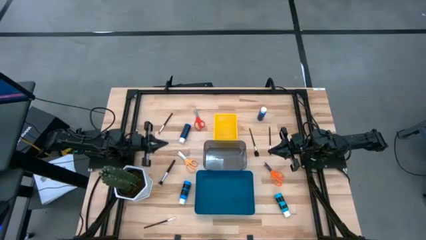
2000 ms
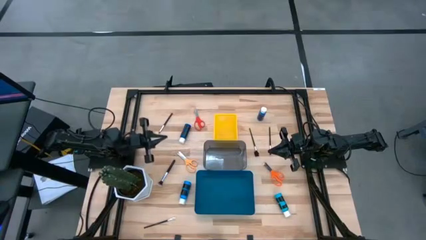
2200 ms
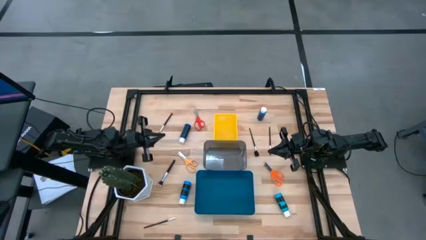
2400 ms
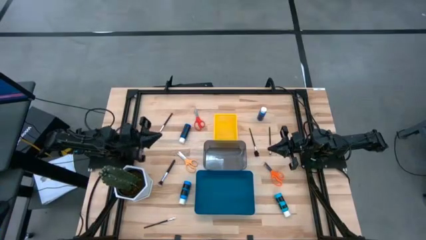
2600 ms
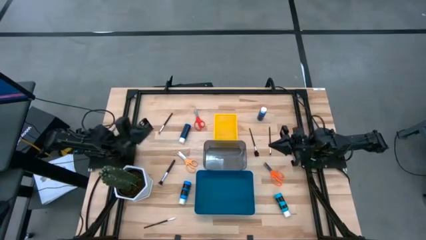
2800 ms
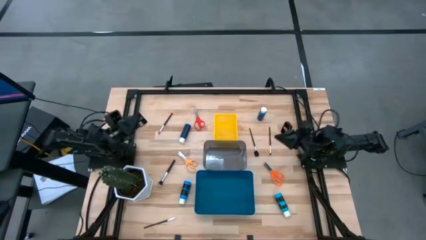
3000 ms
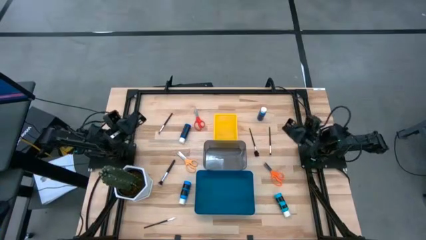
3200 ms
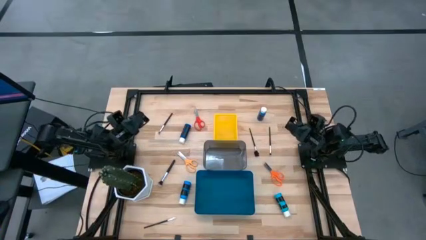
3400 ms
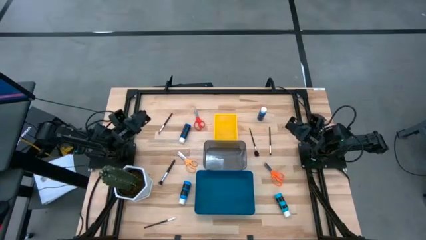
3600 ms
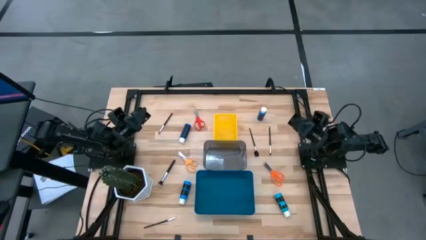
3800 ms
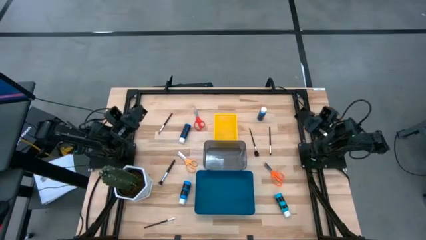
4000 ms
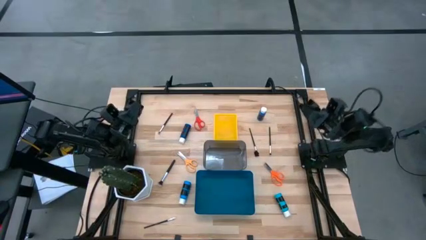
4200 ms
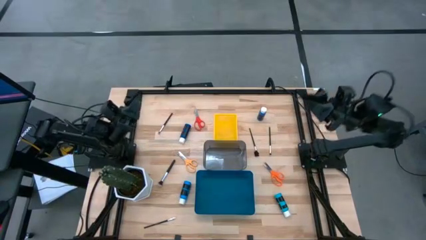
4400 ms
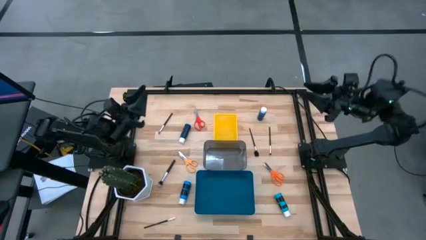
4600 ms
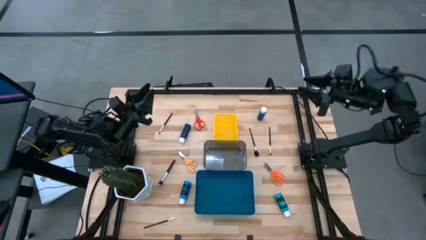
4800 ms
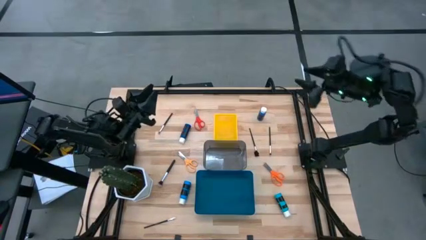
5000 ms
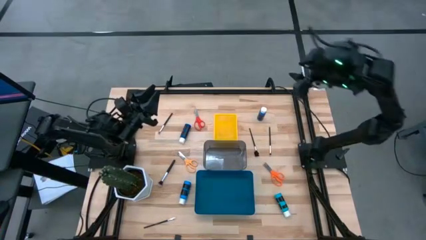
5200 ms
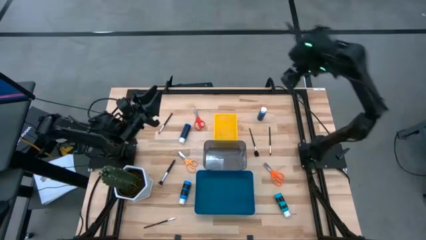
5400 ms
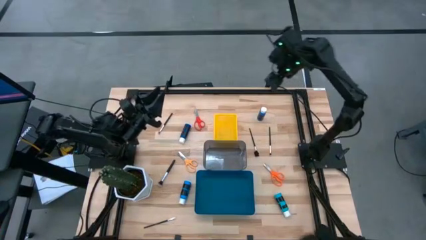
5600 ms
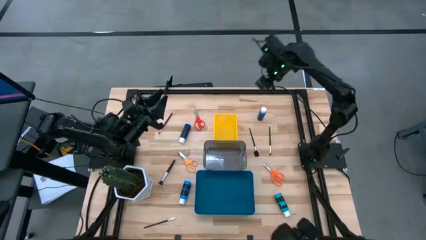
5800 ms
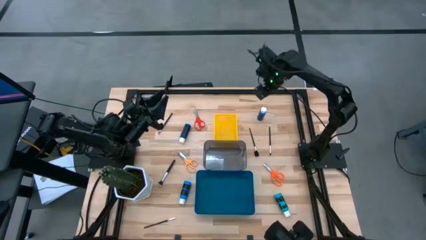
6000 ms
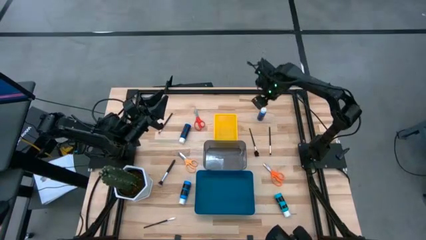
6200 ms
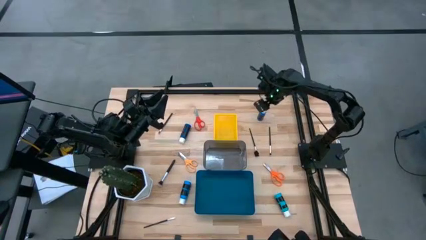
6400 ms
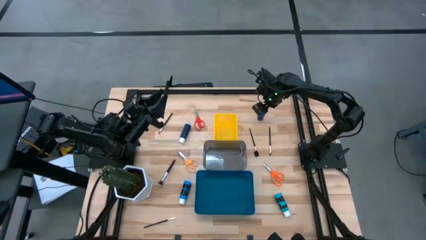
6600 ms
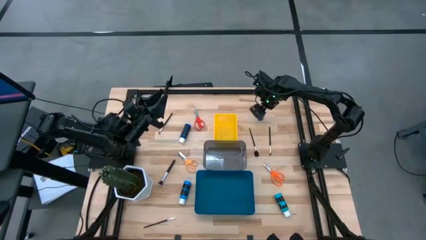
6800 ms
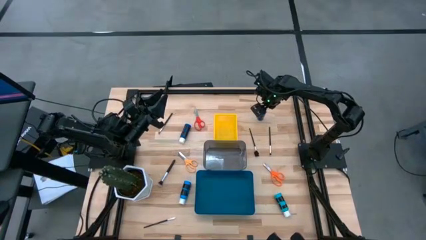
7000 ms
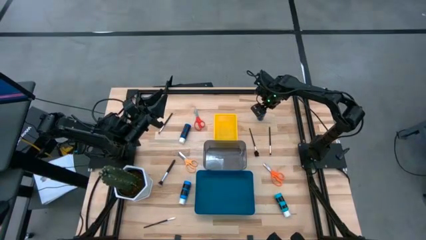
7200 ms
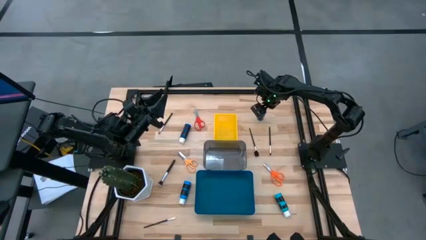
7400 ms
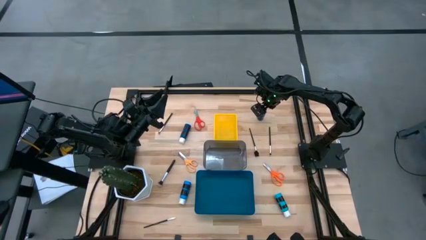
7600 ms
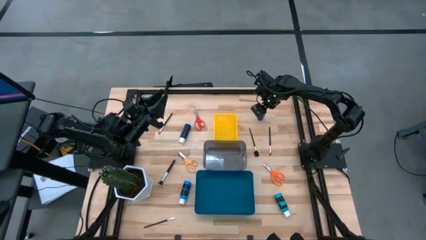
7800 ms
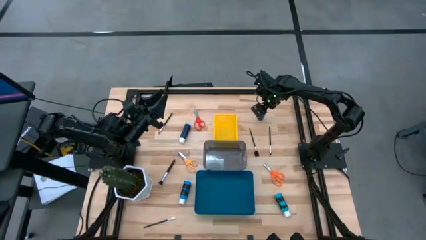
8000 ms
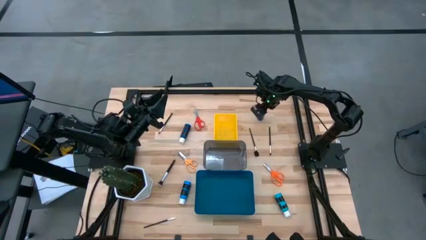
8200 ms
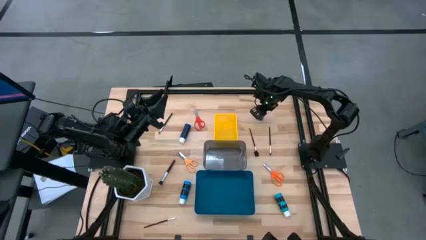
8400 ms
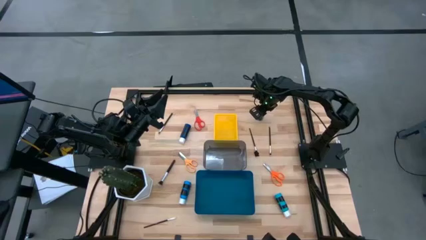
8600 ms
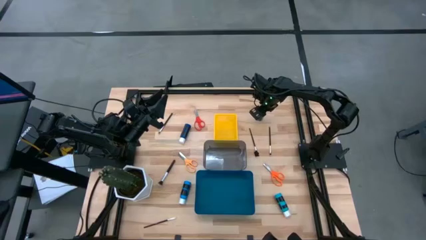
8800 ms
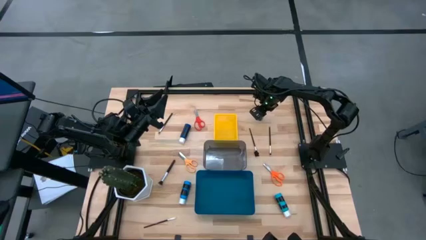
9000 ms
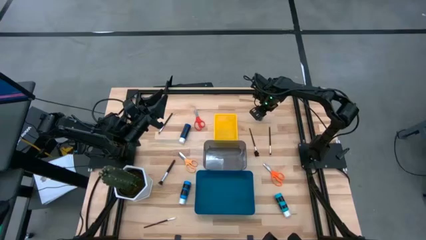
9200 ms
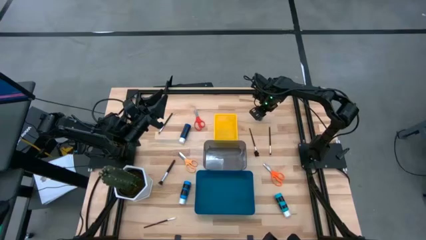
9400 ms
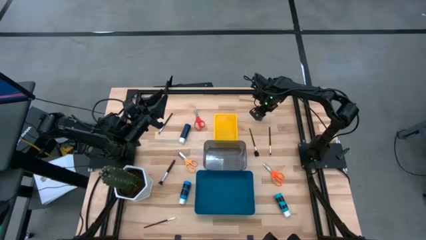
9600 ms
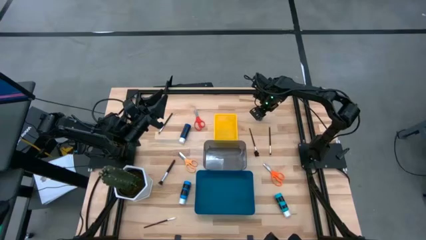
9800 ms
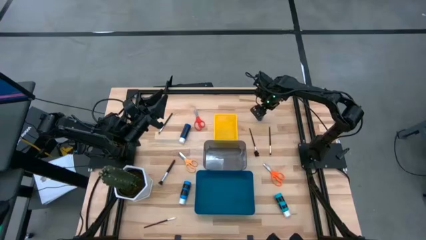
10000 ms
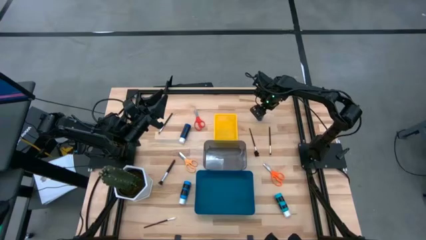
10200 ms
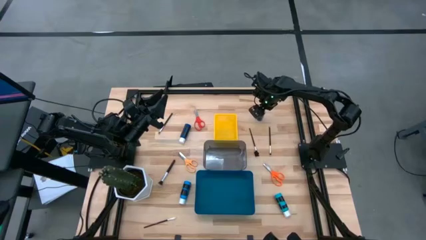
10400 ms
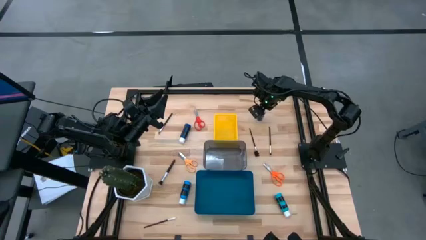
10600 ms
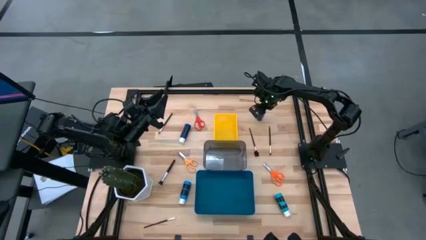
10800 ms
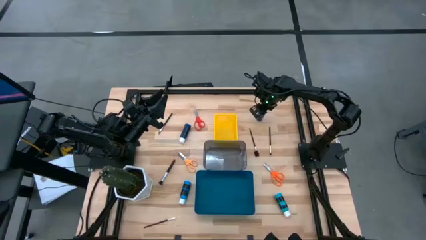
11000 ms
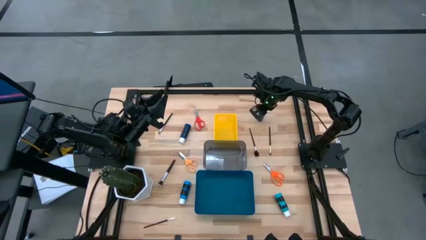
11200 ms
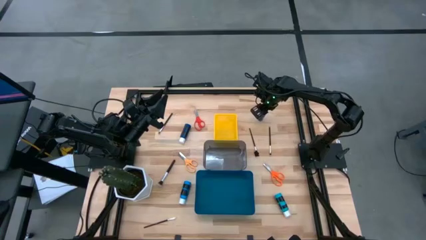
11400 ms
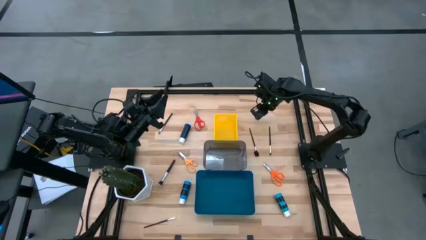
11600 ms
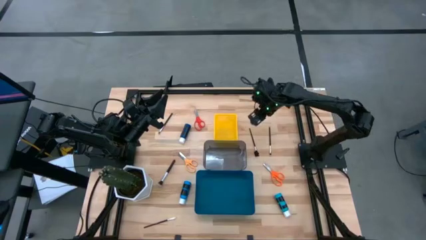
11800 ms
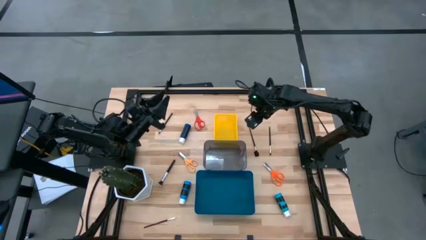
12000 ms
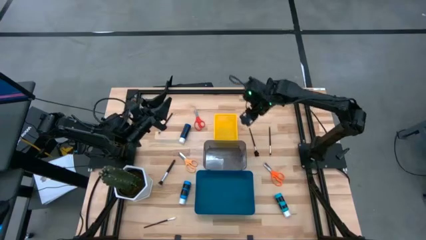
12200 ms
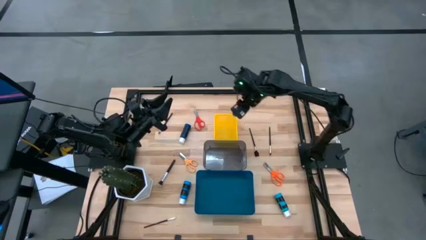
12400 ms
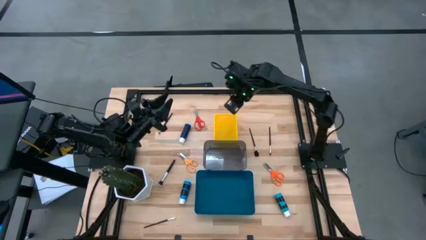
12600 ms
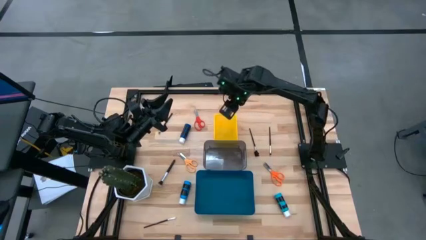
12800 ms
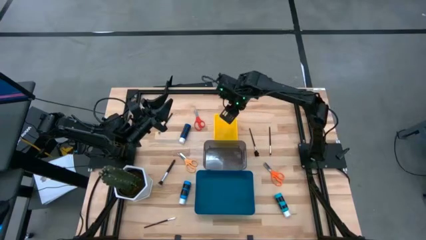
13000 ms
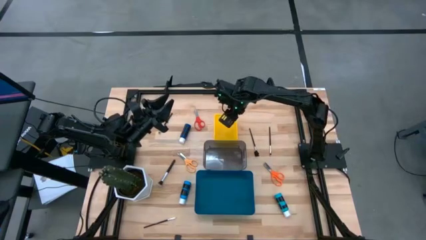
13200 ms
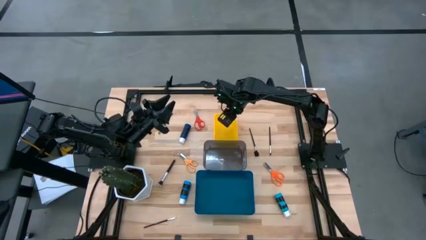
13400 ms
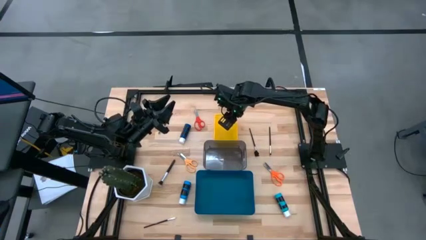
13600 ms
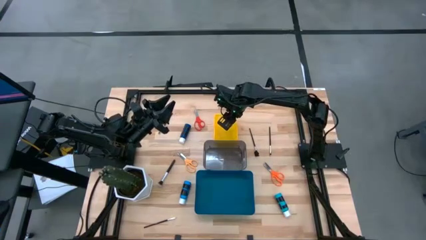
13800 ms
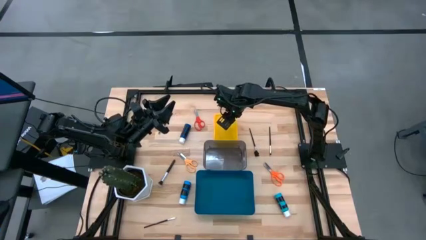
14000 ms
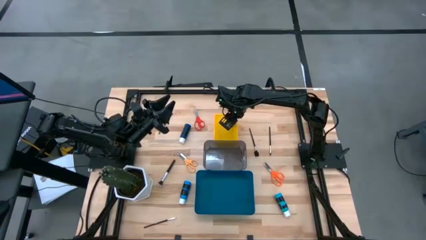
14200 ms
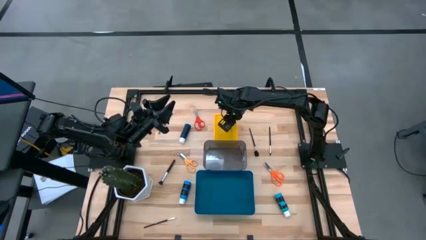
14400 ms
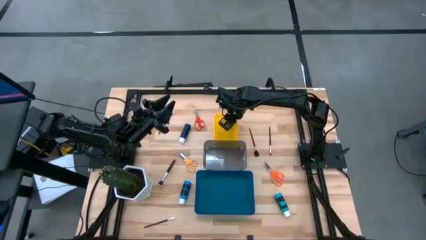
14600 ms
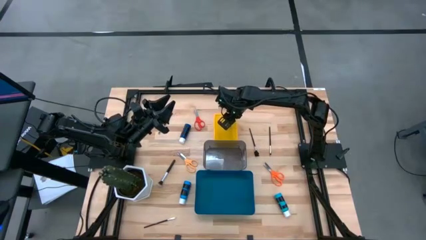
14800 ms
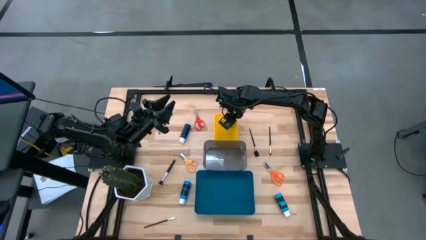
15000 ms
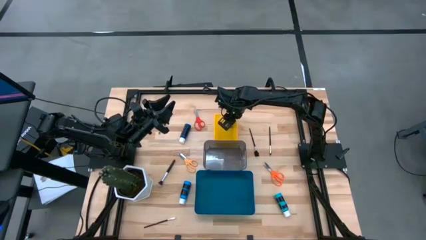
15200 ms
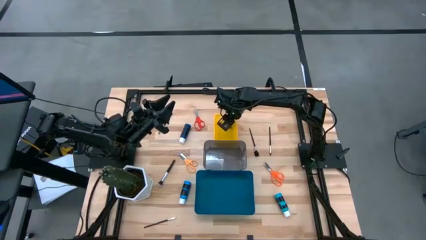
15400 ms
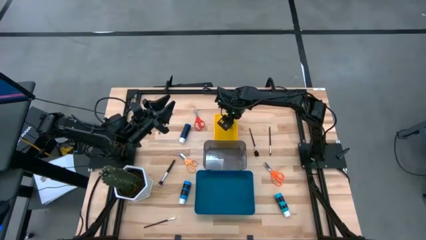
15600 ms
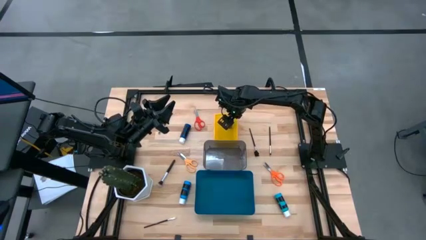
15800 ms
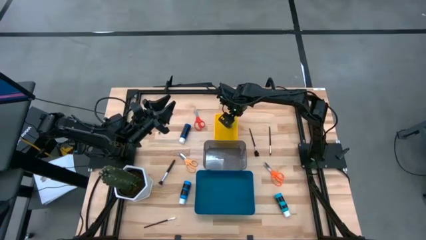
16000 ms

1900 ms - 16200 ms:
Task: Pick & Place Paint Supplies
Put the blue paint bottle into the yellow bin
